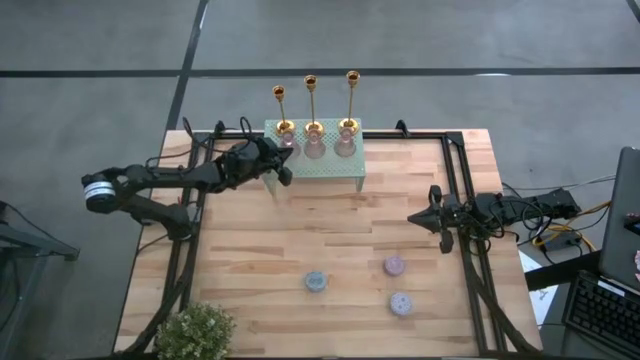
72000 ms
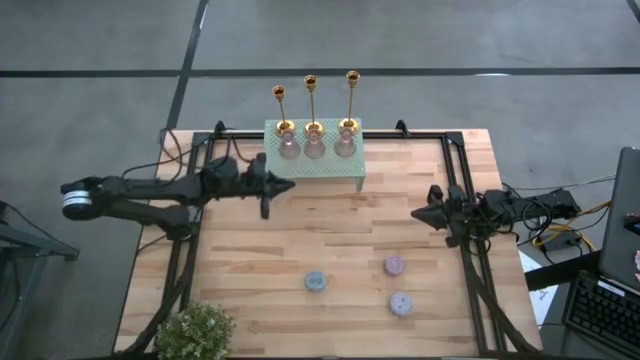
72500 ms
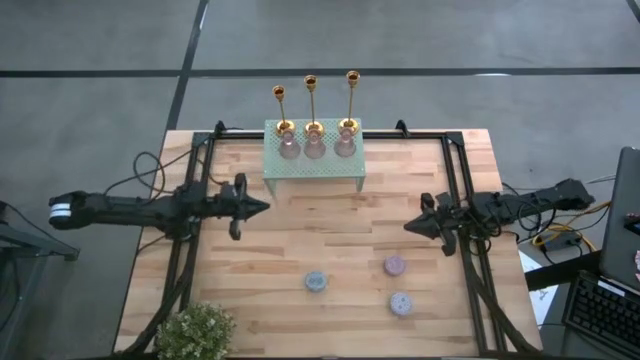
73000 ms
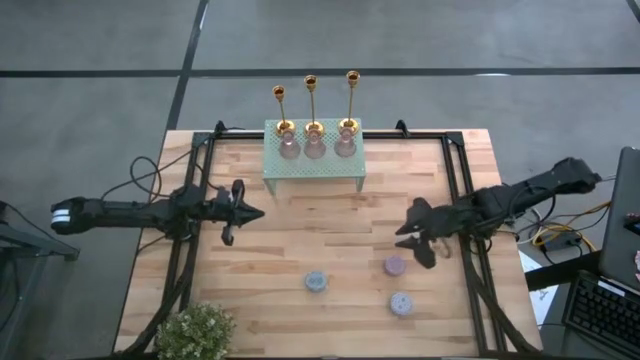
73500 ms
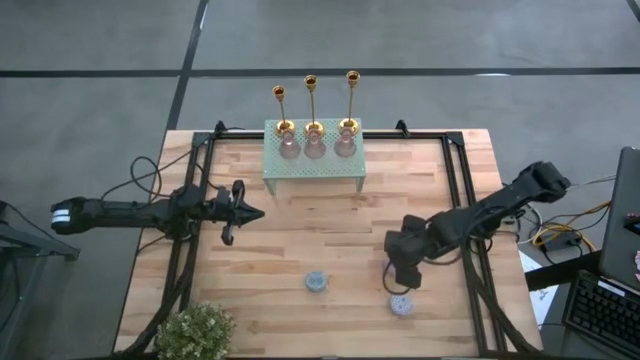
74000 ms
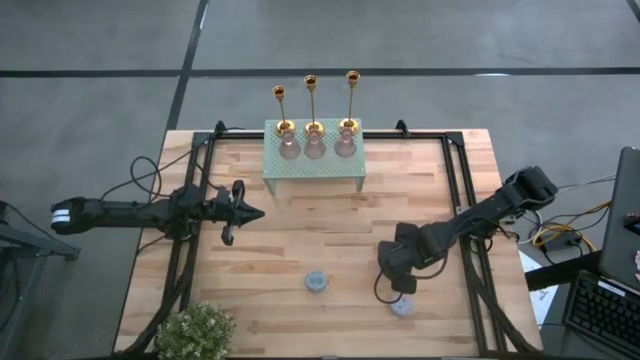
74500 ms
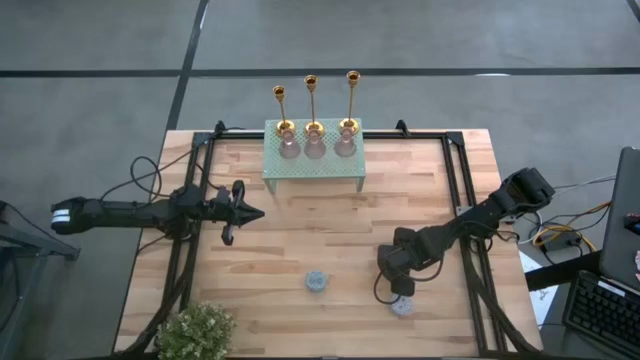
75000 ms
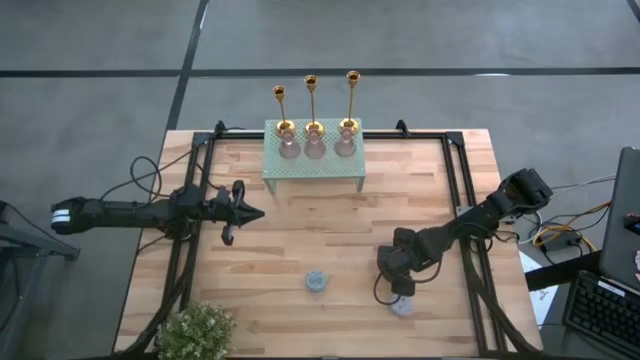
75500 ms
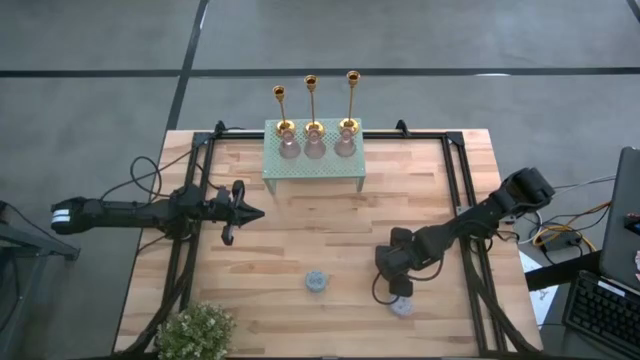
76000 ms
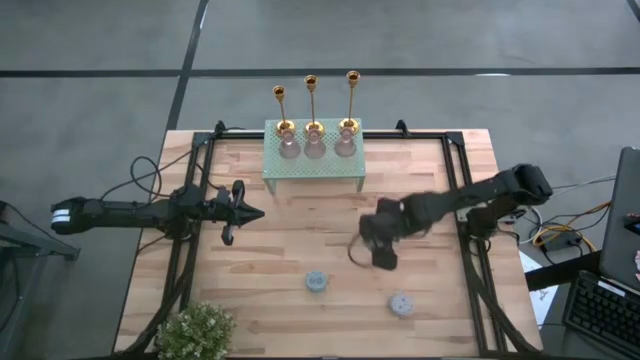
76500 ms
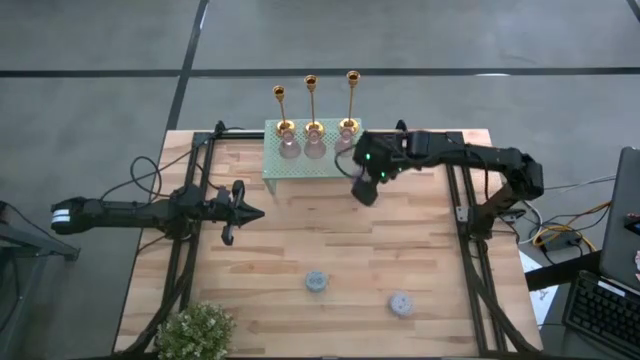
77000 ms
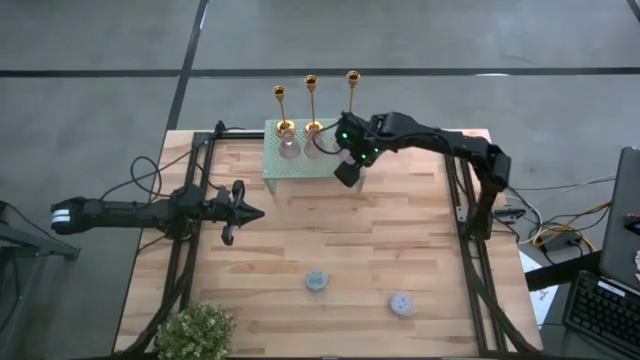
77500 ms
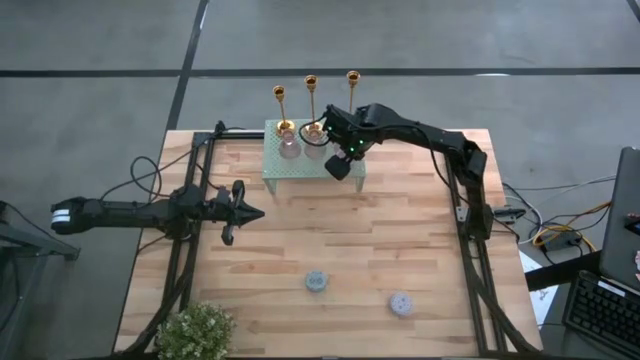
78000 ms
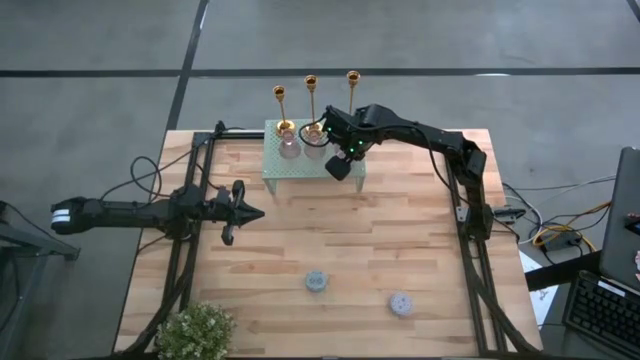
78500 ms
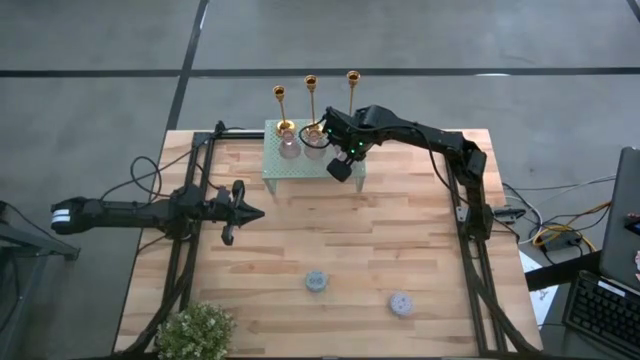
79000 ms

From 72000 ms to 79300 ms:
Task: Pick & Place candle stick holders
Put the purple scented candle on the shelf

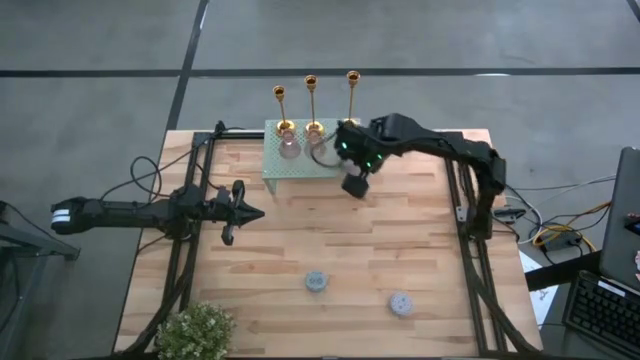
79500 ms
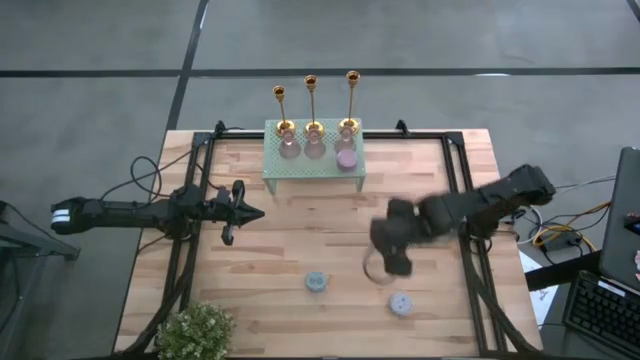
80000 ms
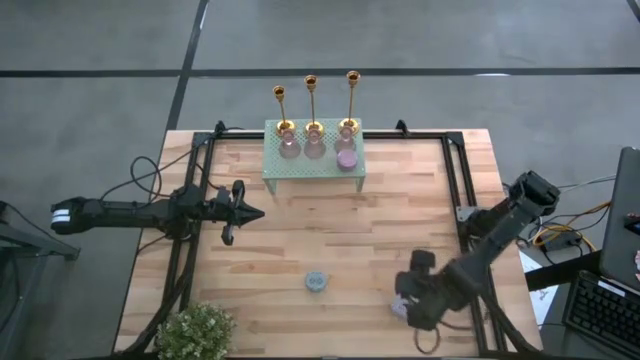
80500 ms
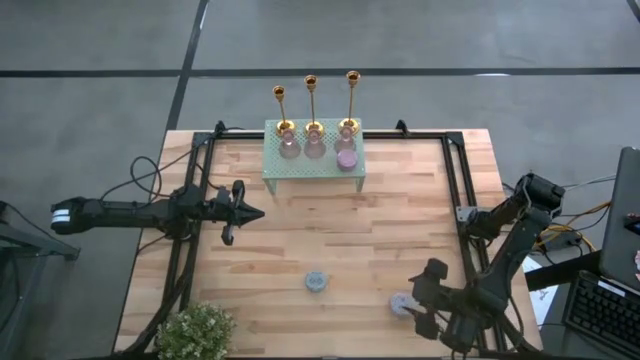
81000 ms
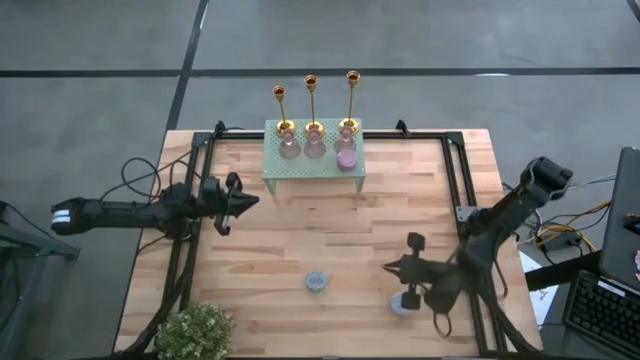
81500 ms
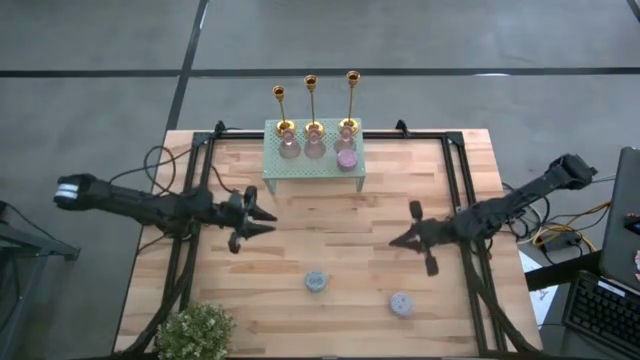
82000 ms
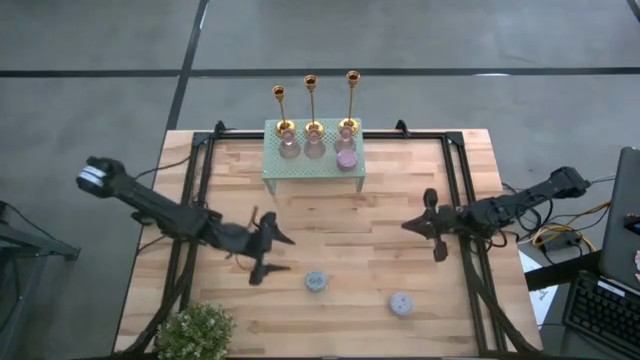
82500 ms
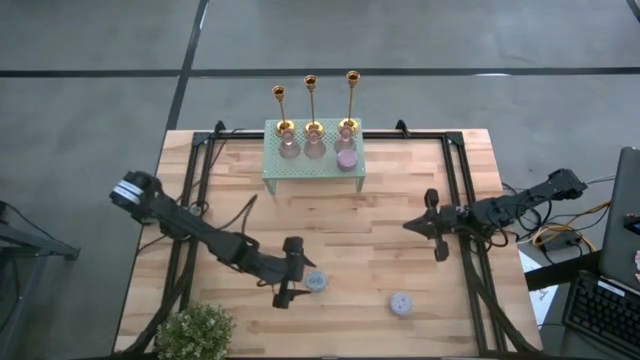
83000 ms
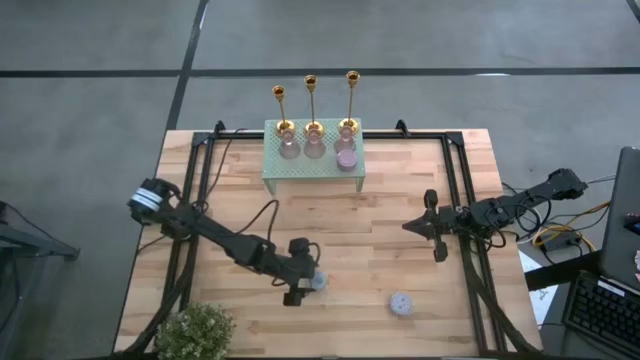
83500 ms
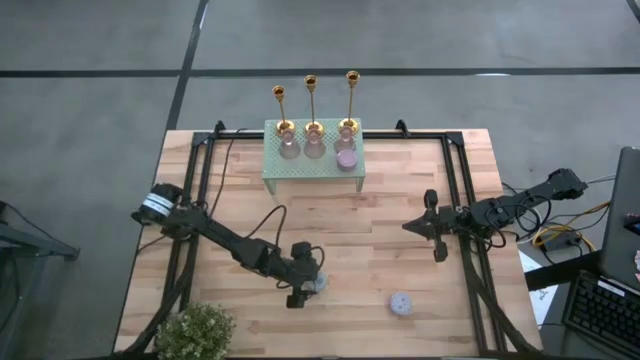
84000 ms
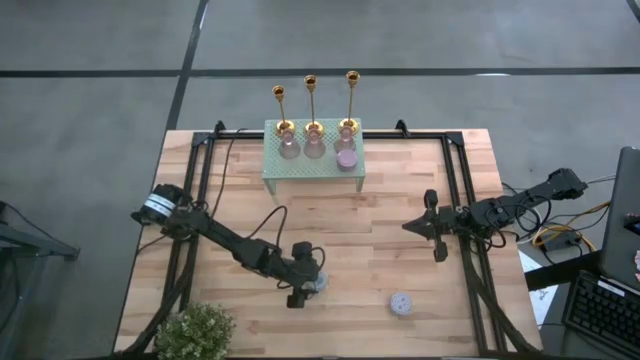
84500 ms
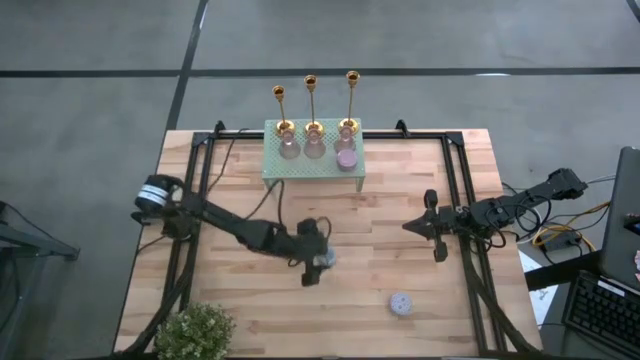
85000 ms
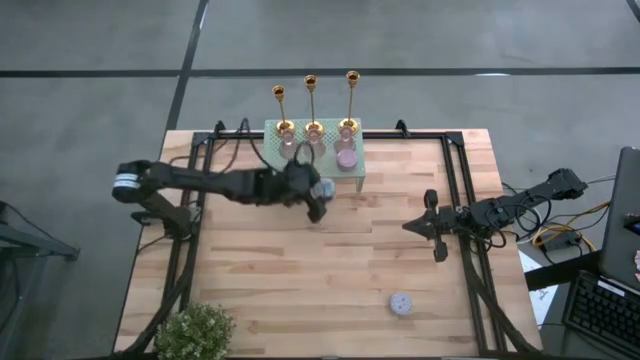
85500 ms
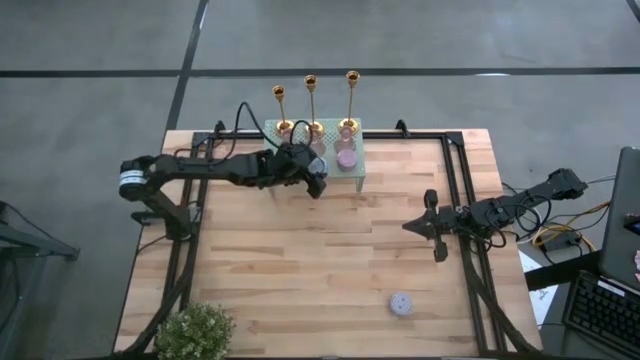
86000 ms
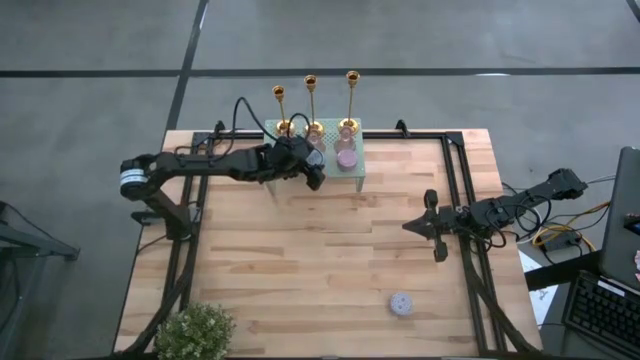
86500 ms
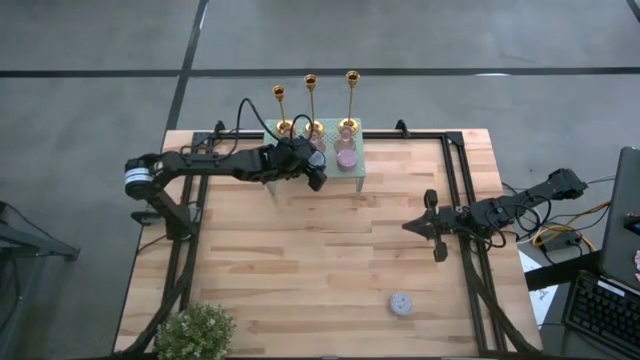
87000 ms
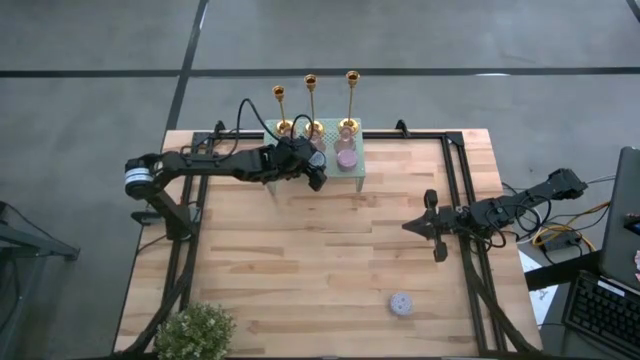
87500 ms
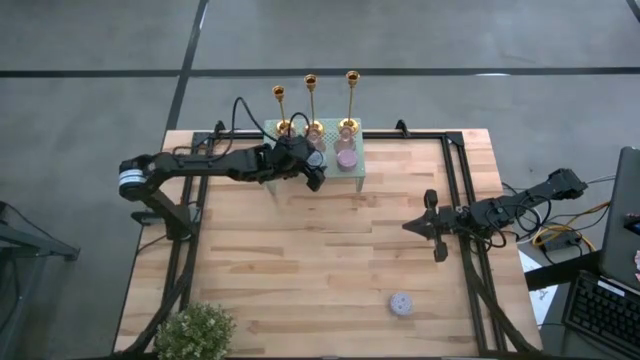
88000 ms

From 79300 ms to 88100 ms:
Put the blue scented candle on the shelf aligned with the purple scented candle

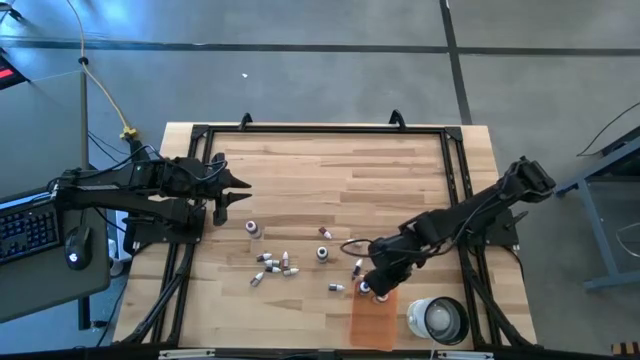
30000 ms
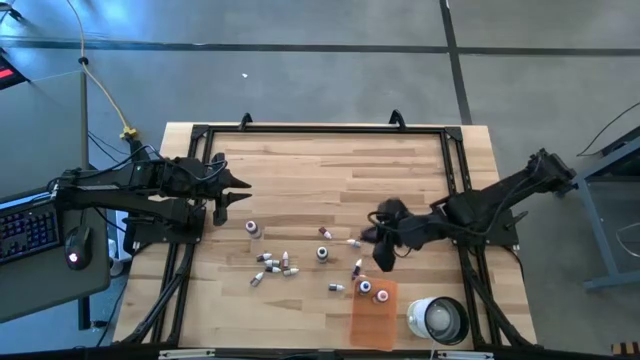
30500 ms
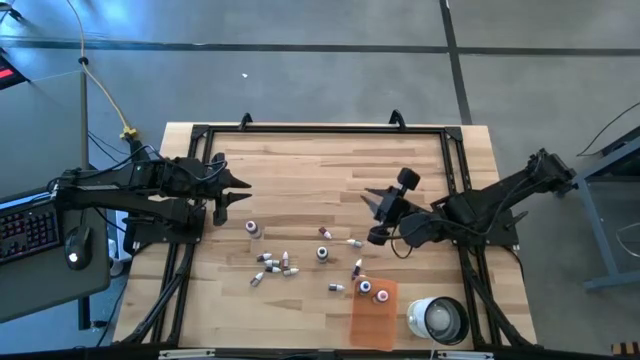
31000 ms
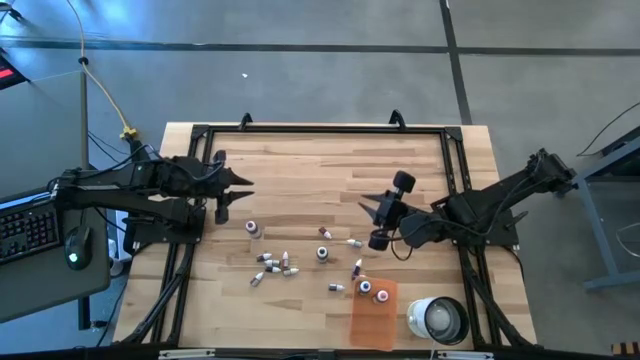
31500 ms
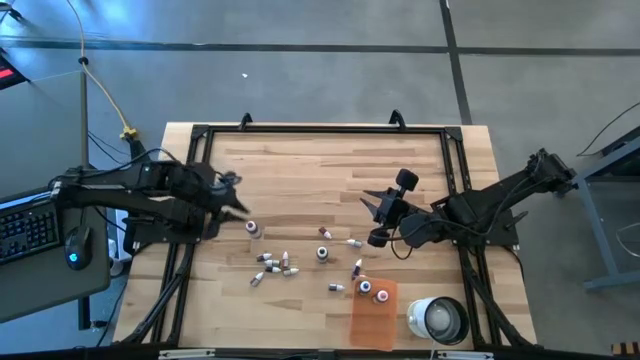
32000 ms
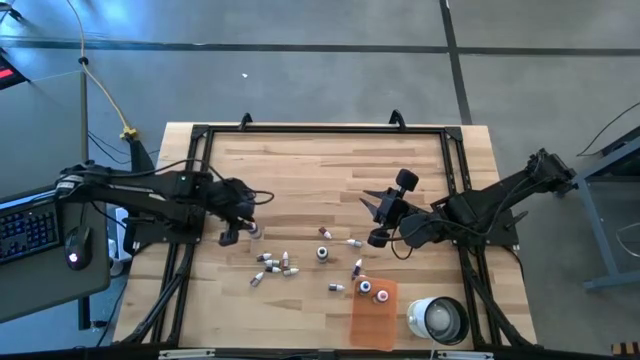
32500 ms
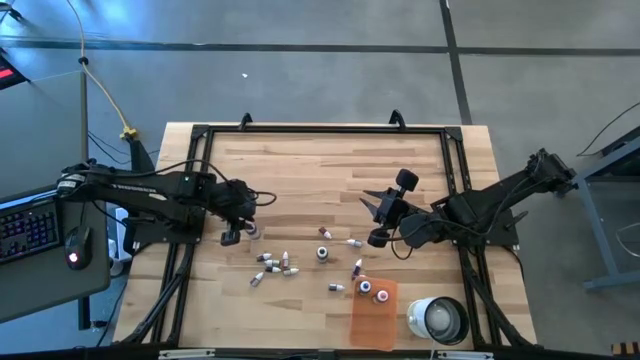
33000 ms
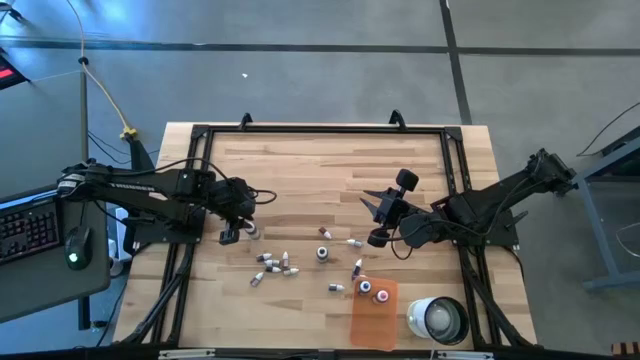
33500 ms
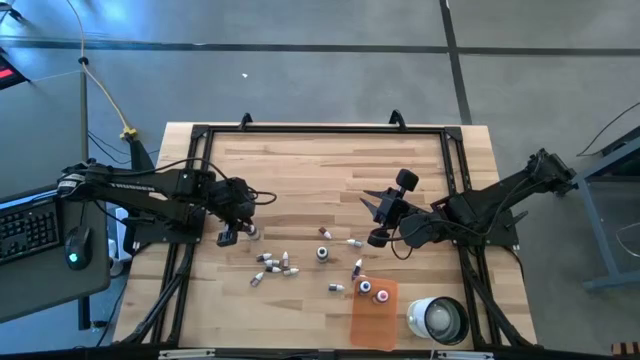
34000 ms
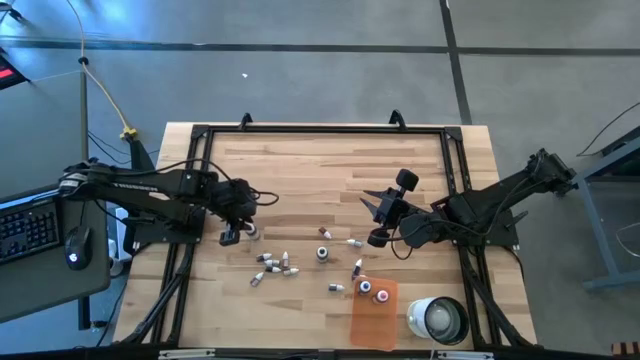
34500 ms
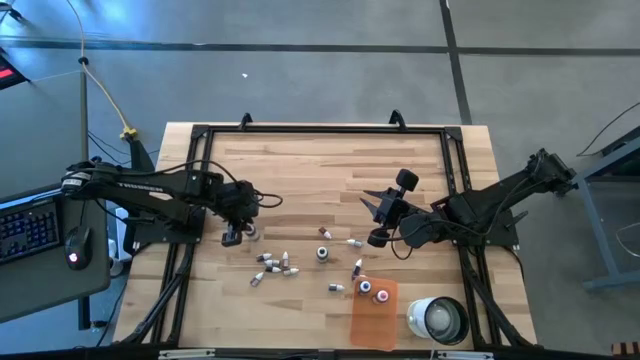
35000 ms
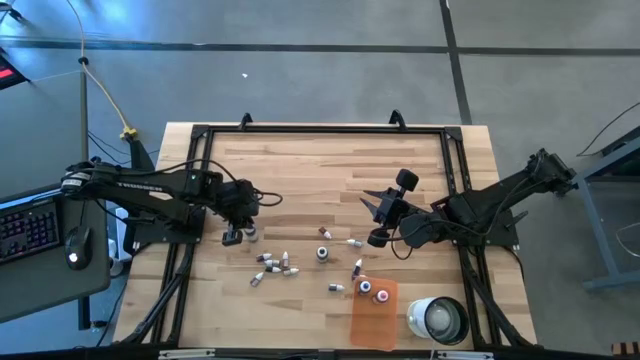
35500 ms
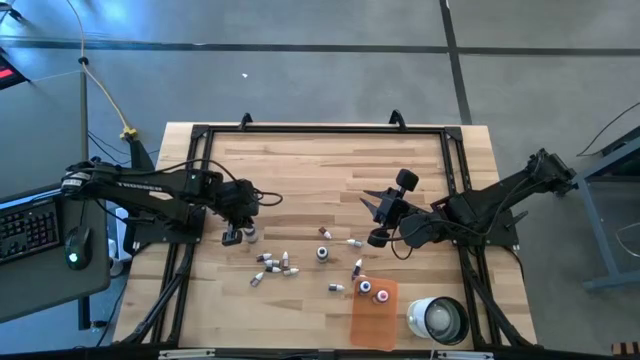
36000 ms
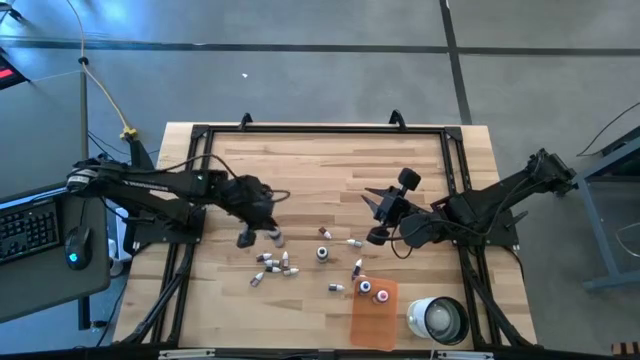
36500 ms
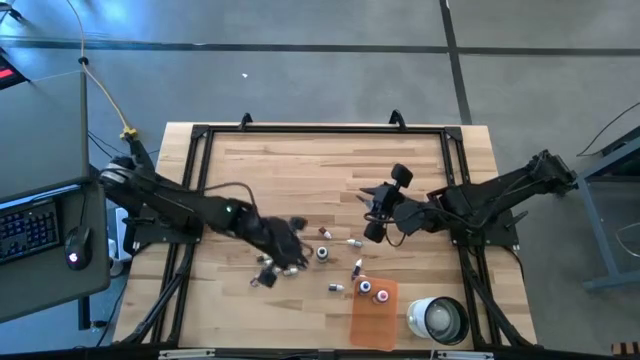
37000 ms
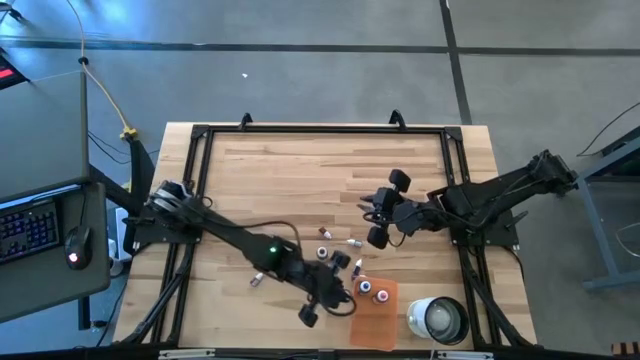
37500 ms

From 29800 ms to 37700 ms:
Task: Pick & Place food coloring
Put the large purple food coloring bottle into the orange bin
